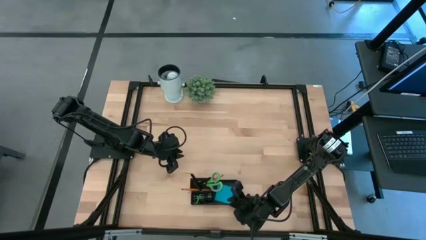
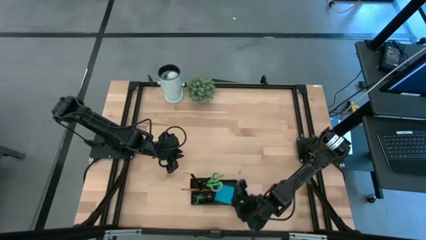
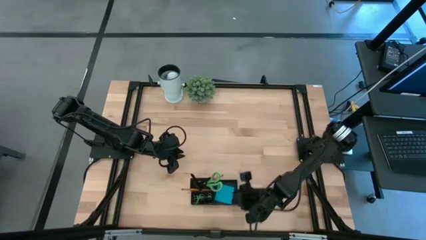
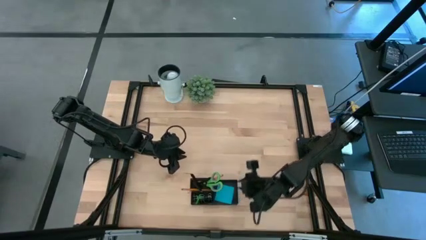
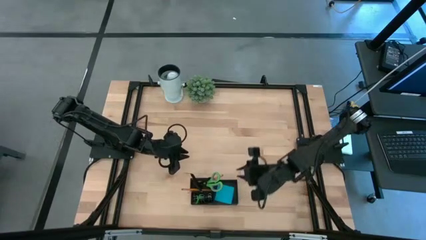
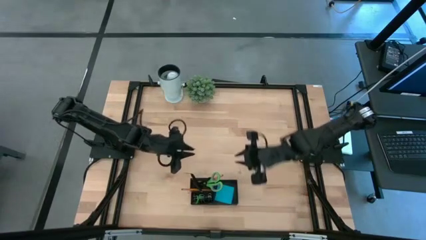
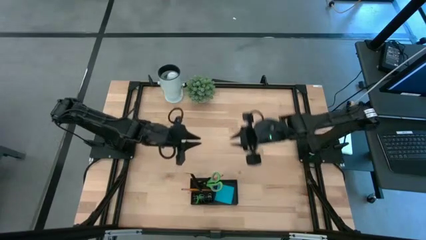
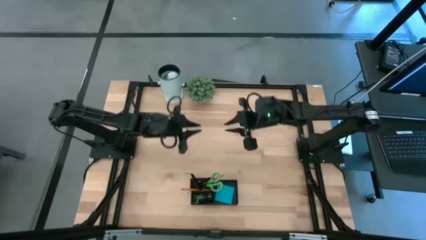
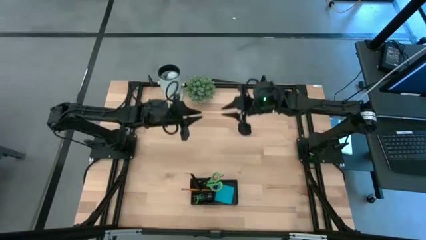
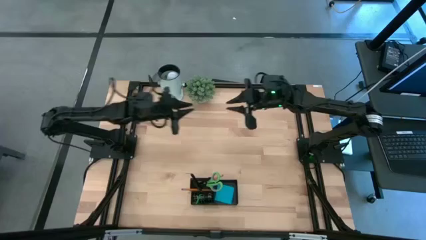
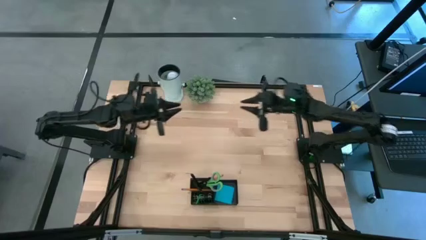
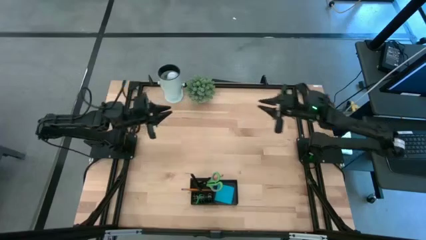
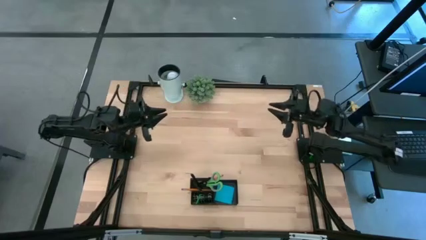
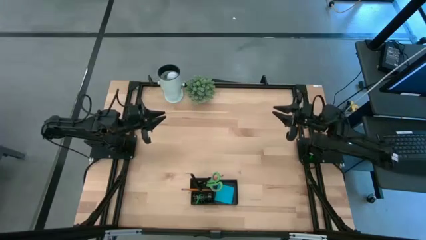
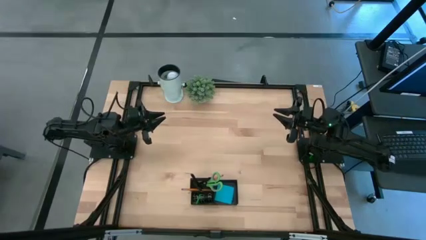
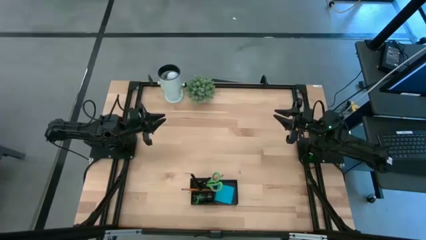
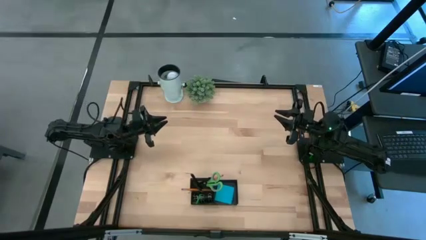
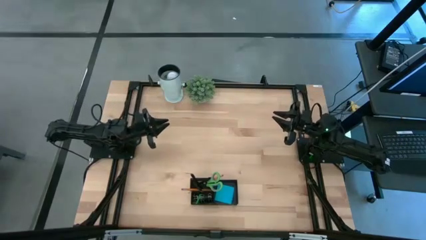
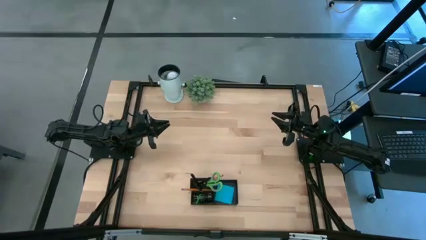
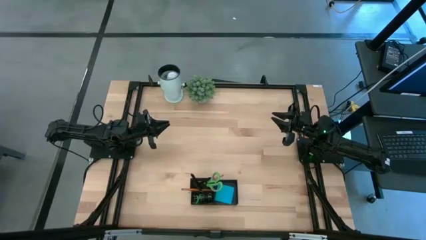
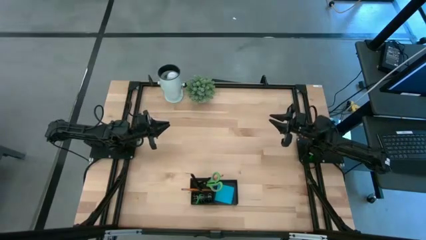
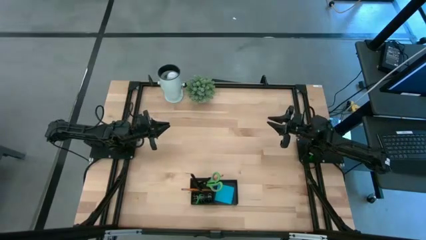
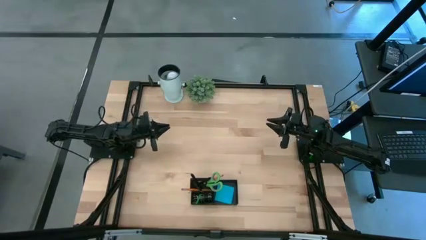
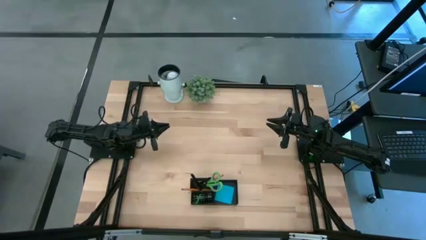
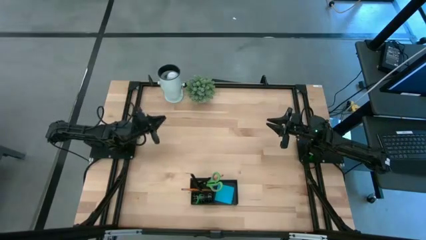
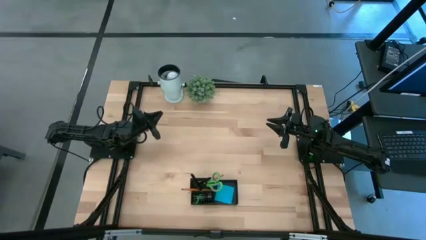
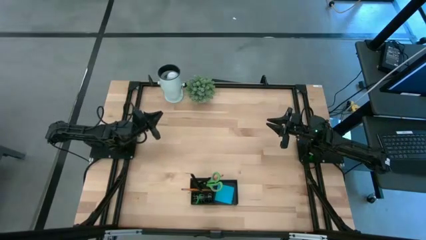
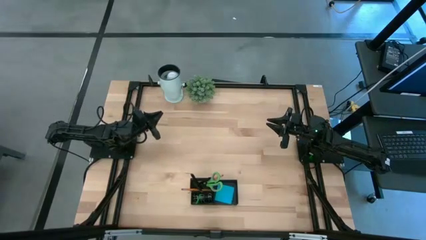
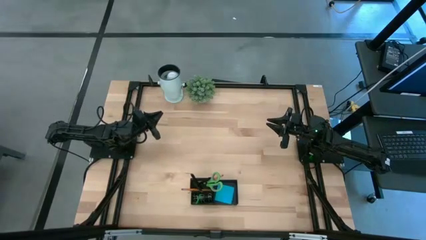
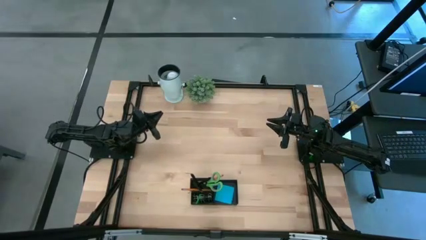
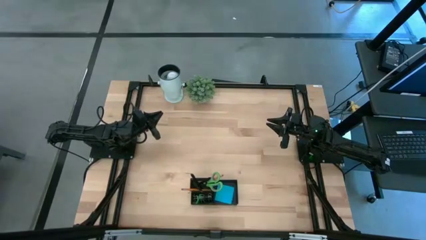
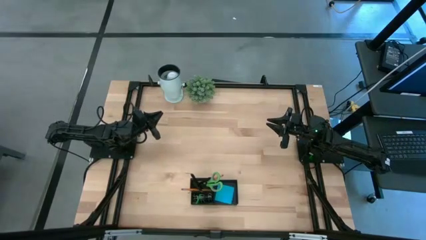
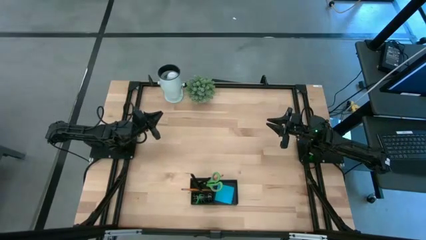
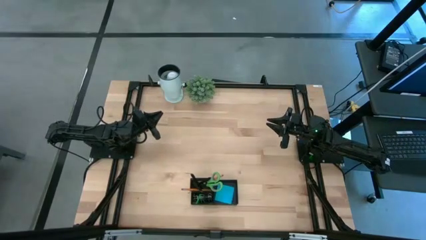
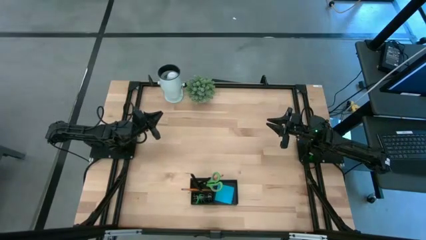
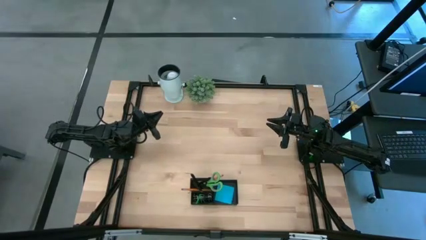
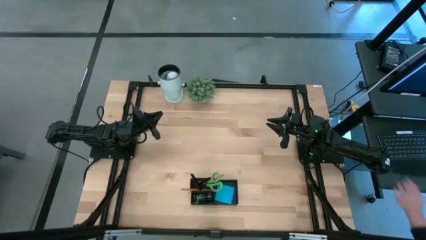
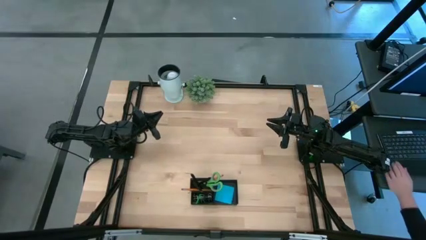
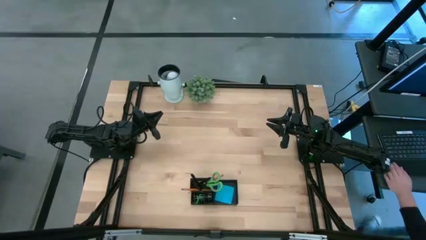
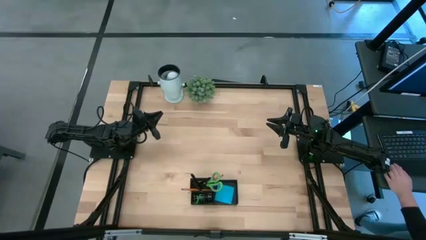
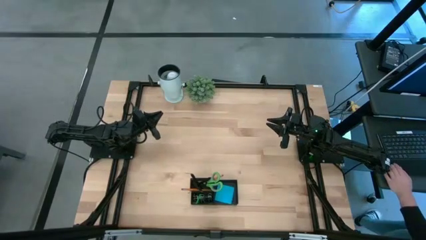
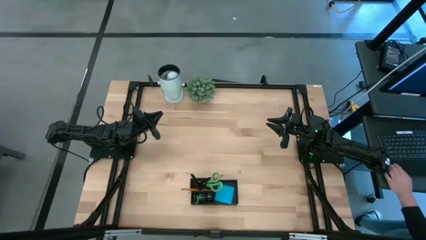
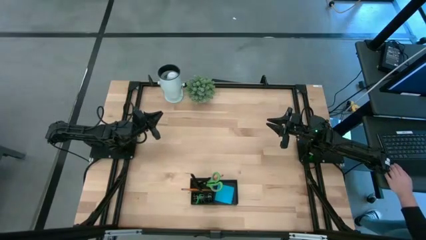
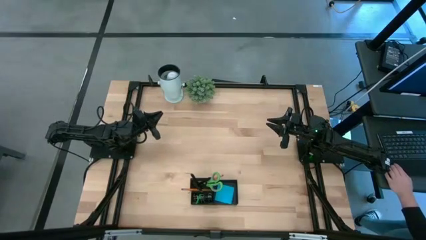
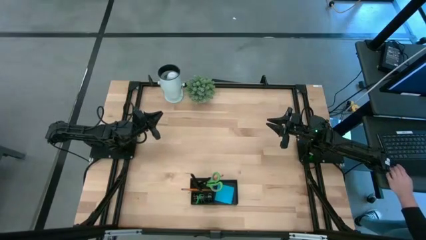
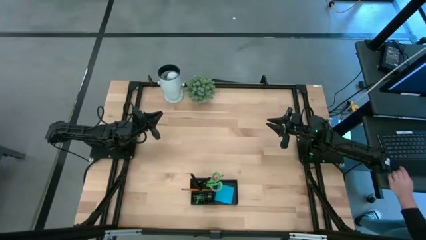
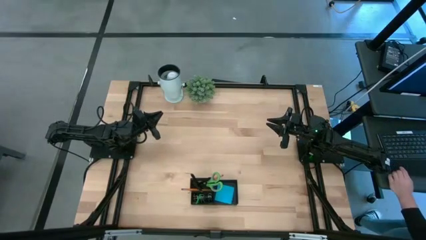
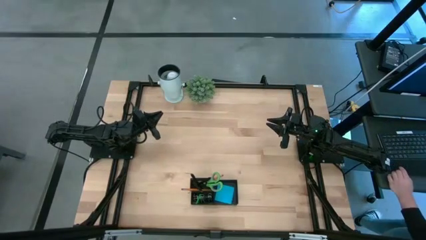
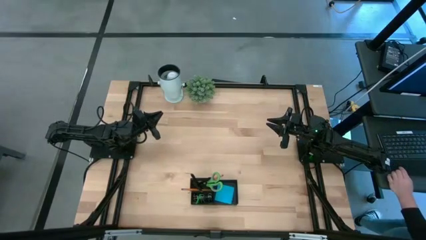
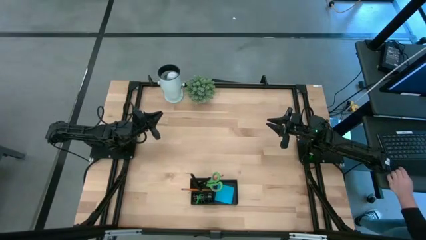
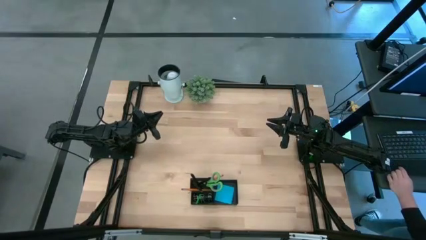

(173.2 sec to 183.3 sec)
Task: Pick and place office supplies into organizer
Return to Home Position
